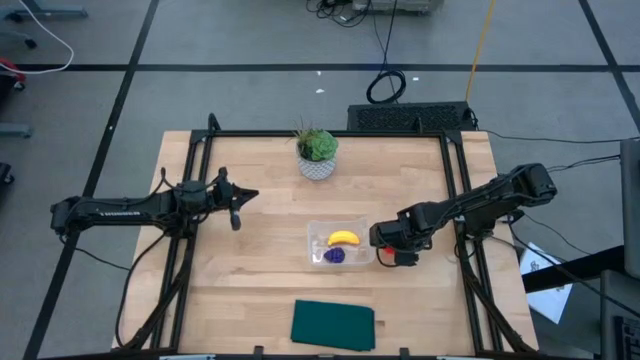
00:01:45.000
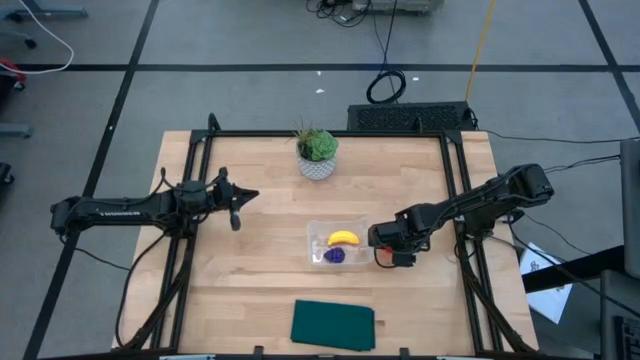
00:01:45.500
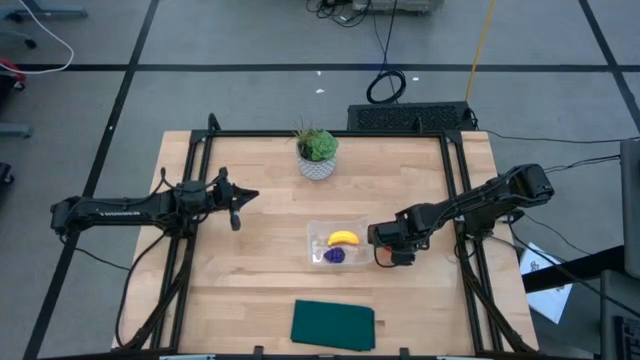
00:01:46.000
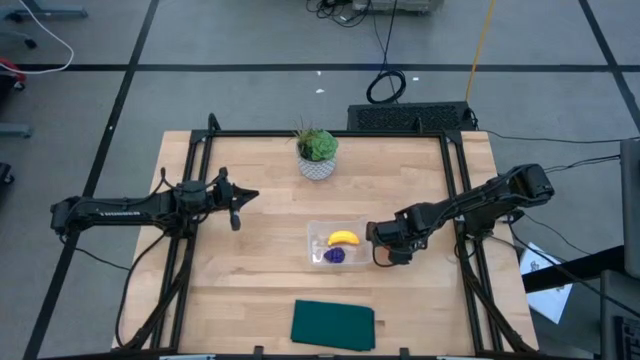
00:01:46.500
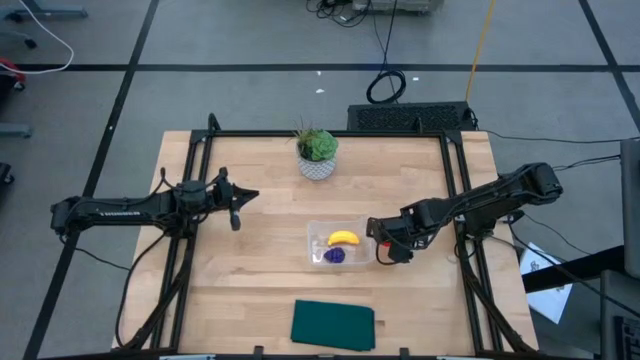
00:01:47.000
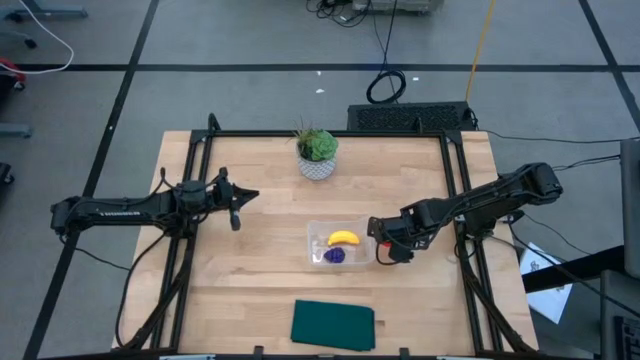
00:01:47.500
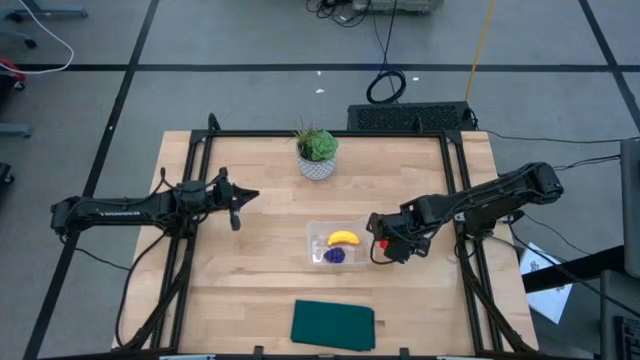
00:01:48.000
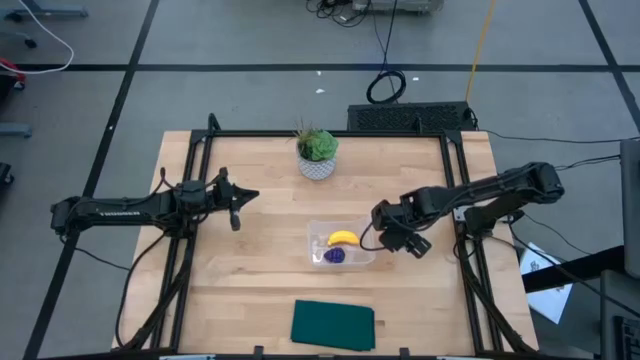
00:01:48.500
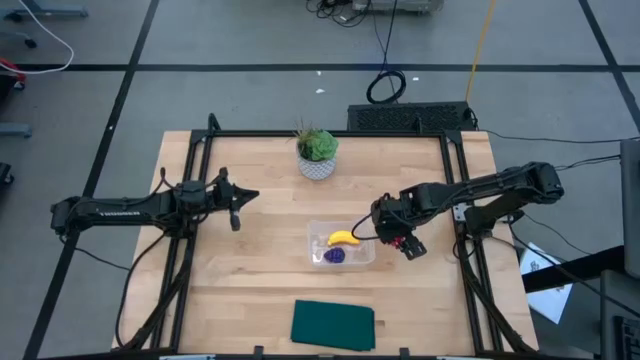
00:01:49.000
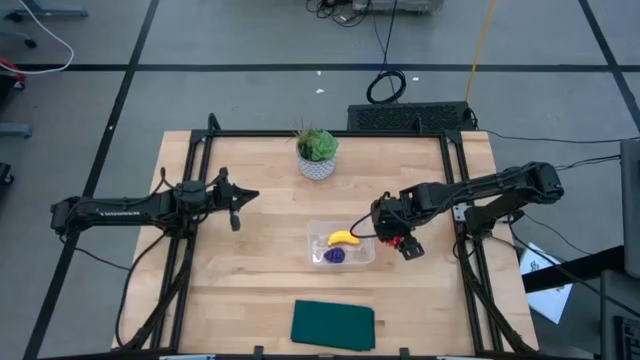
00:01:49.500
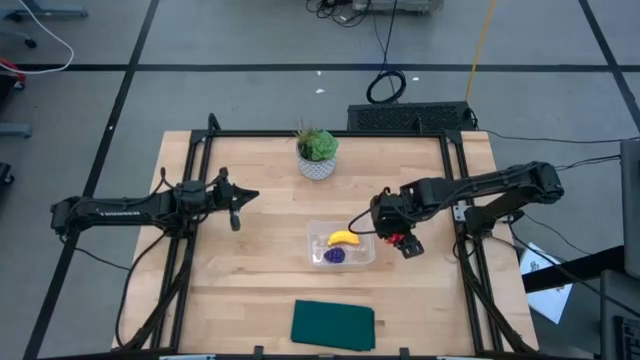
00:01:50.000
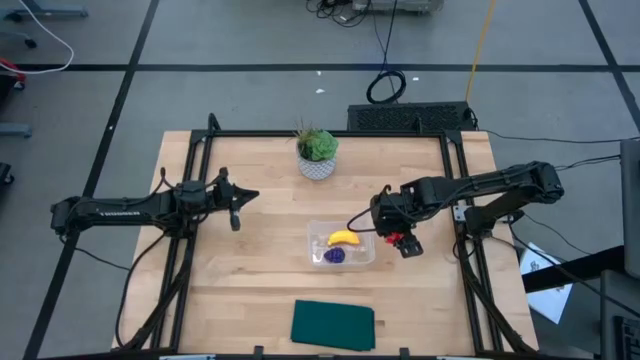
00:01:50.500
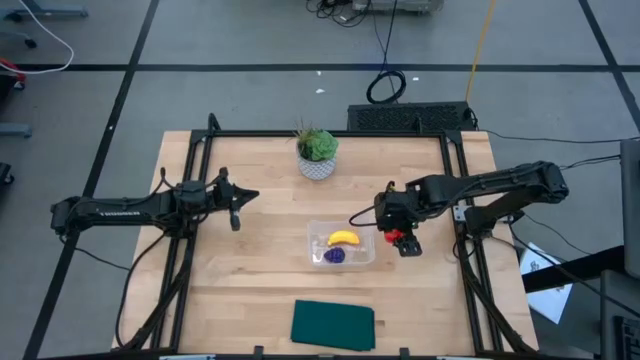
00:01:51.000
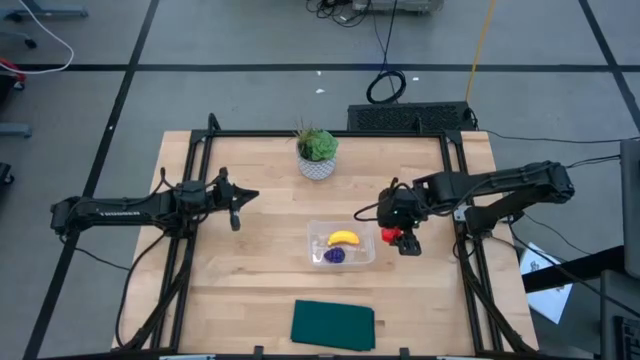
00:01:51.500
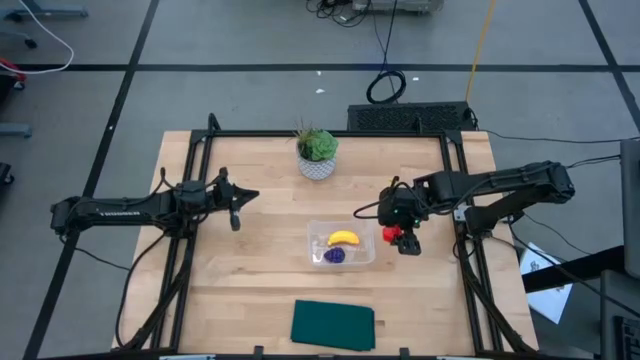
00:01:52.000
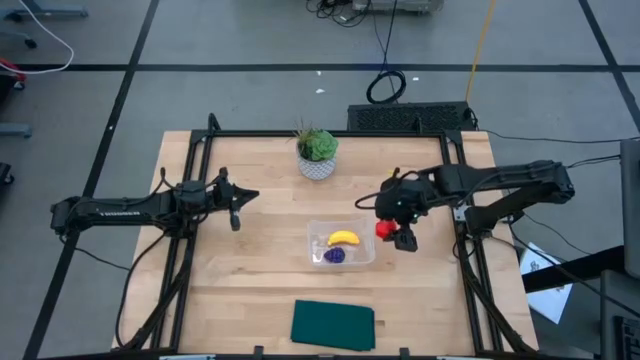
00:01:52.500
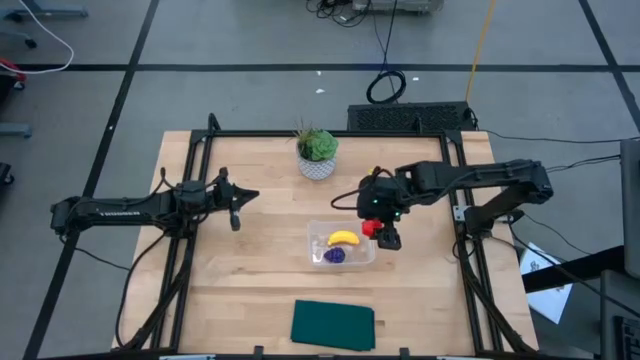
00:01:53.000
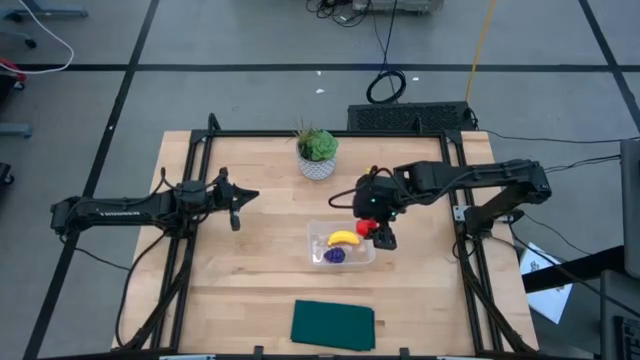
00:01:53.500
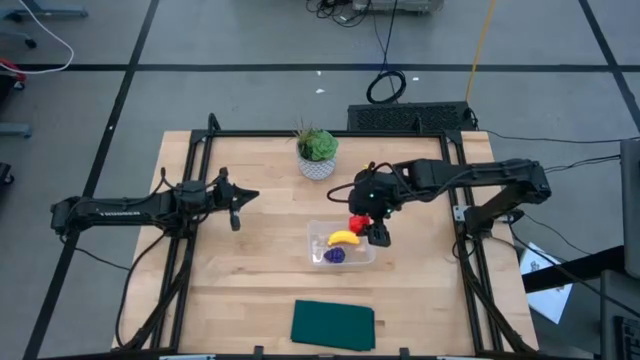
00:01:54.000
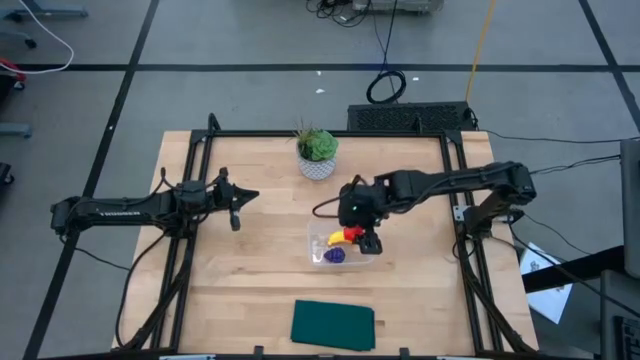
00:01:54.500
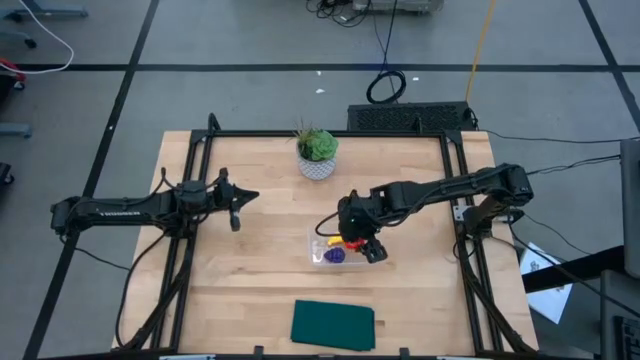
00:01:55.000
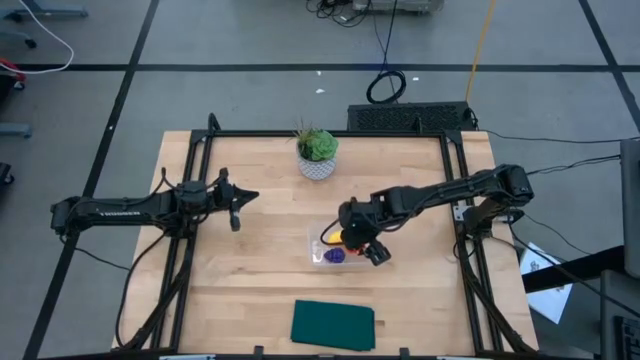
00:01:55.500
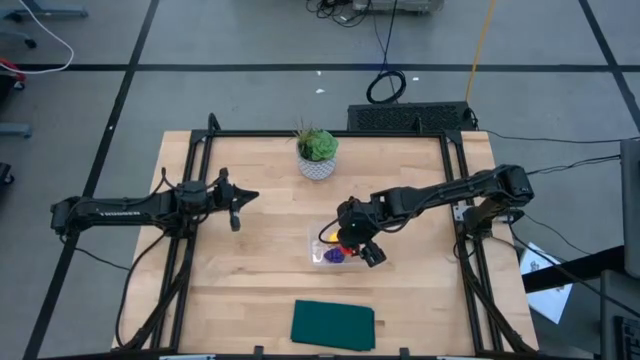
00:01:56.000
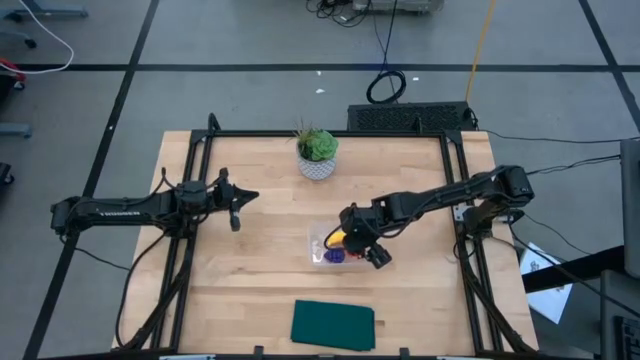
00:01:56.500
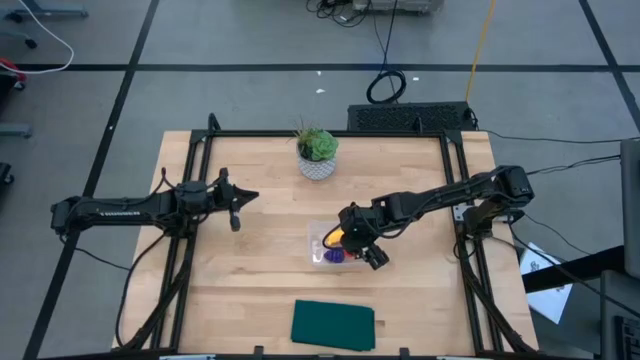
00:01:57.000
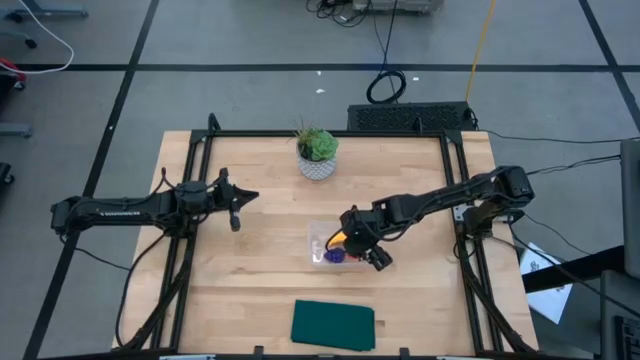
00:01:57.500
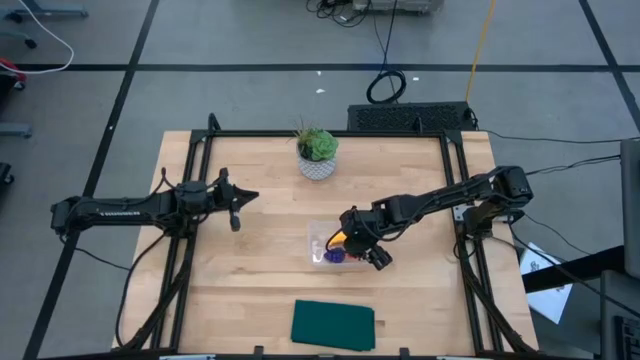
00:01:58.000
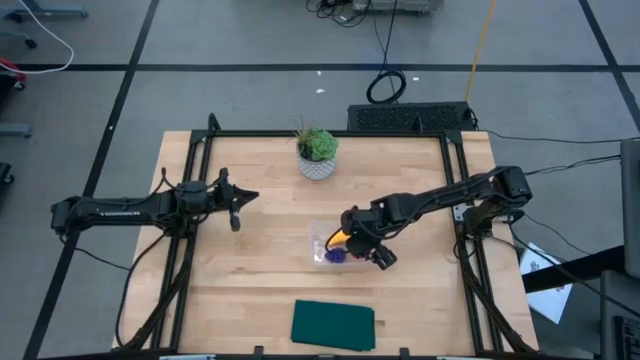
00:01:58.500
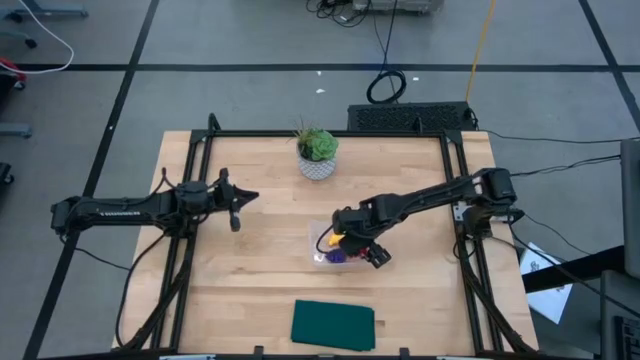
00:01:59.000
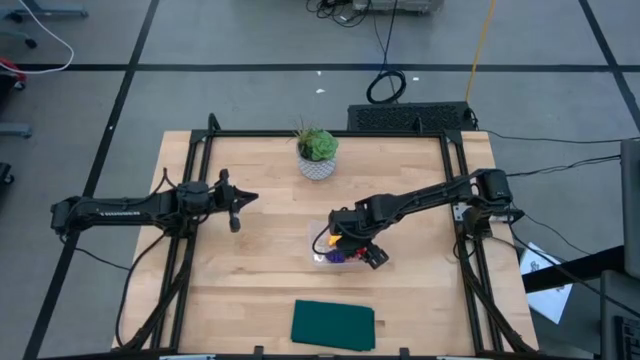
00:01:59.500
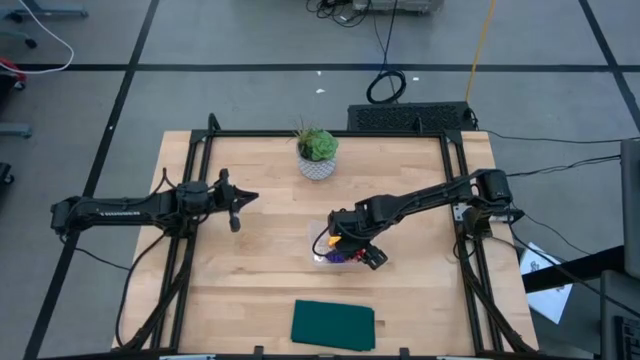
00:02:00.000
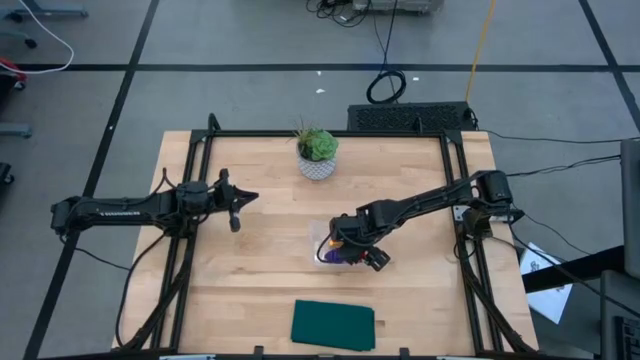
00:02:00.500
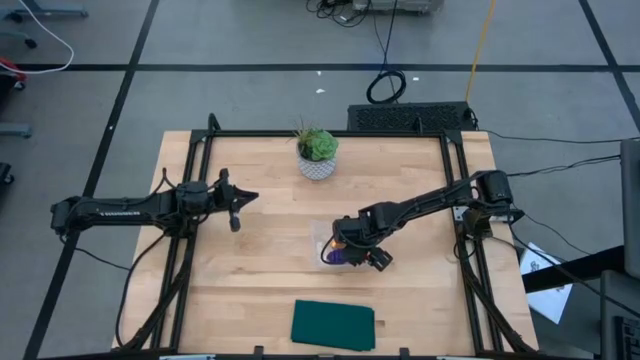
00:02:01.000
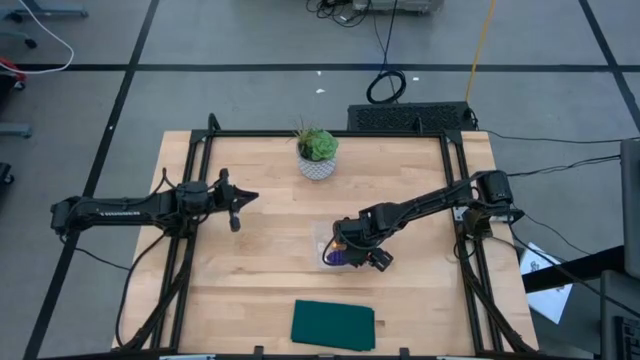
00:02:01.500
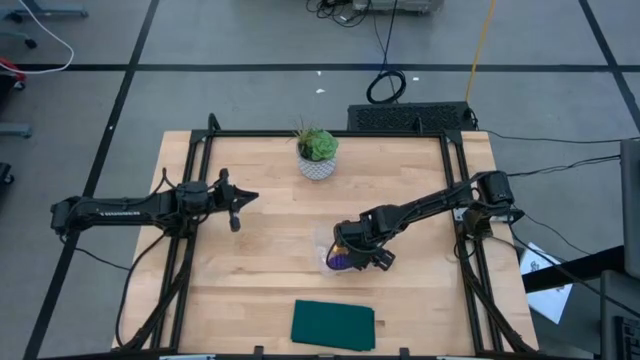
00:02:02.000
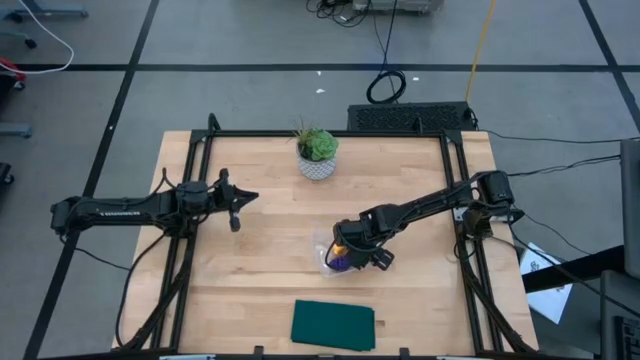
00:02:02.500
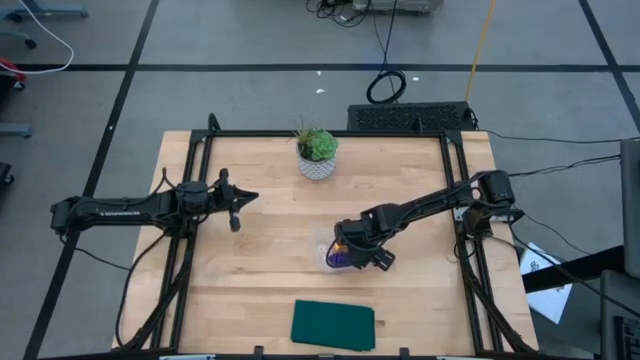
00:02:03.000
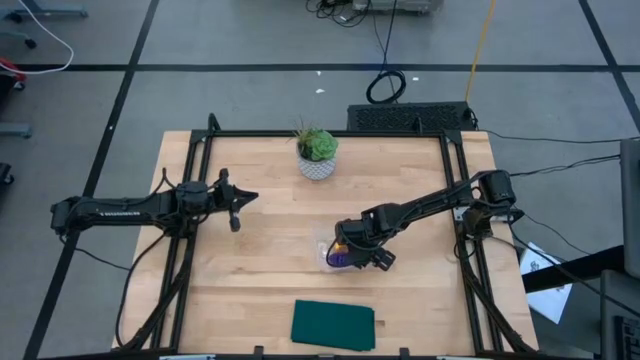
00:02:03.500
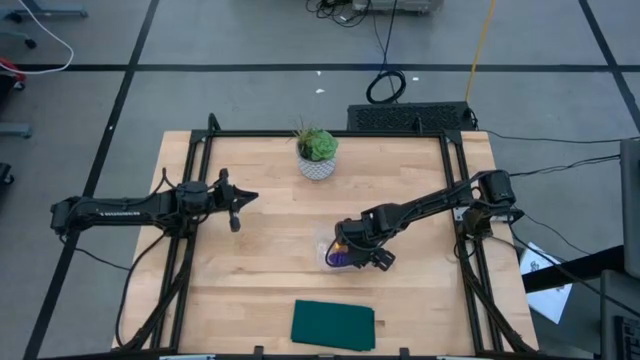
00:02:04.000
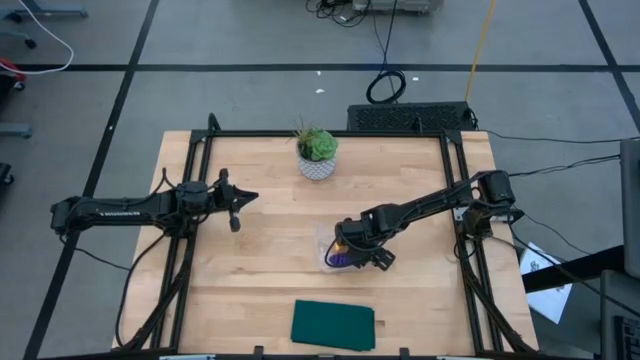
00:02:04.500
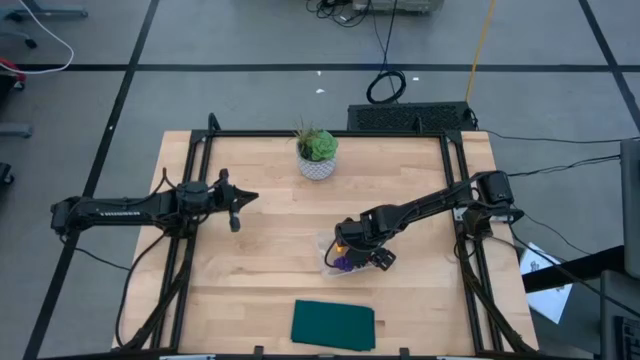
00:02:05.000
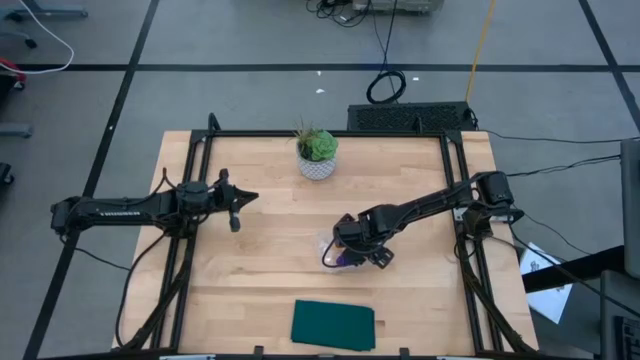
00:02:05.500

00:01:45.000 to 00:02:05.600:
Task: Pick and placing Produce into tupperware
Put the apple into the transparent bin
